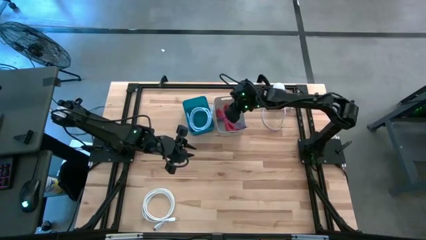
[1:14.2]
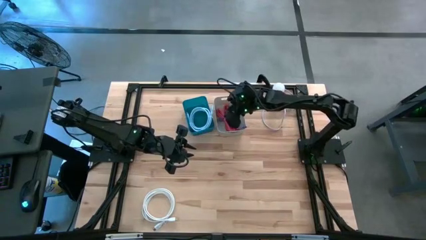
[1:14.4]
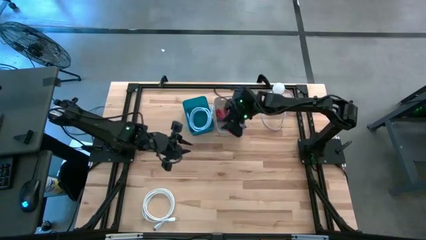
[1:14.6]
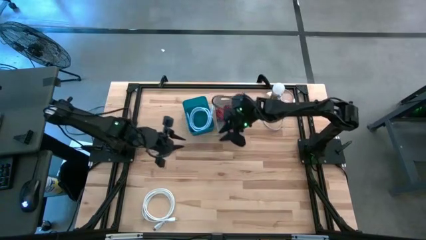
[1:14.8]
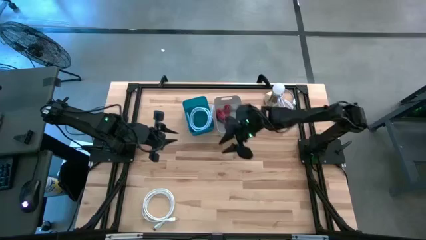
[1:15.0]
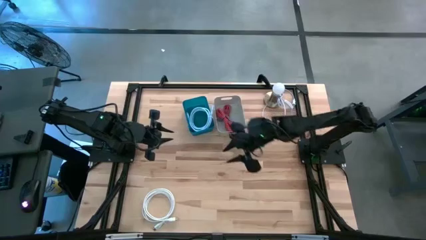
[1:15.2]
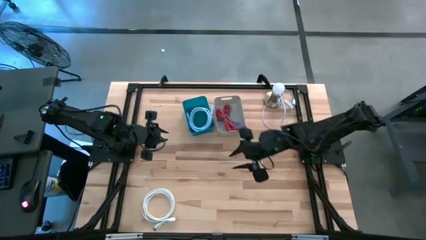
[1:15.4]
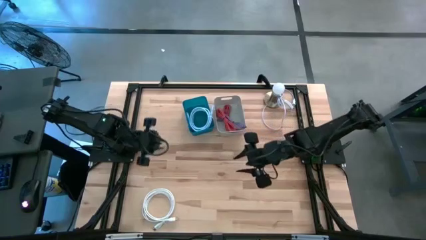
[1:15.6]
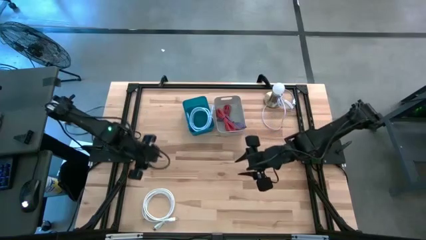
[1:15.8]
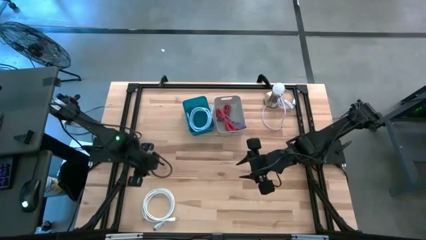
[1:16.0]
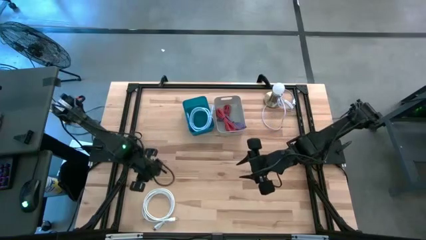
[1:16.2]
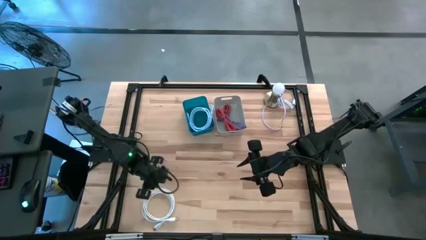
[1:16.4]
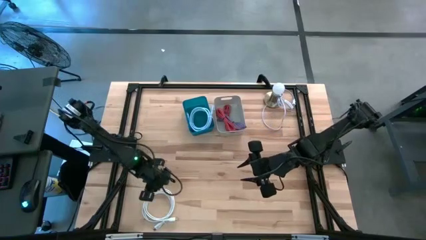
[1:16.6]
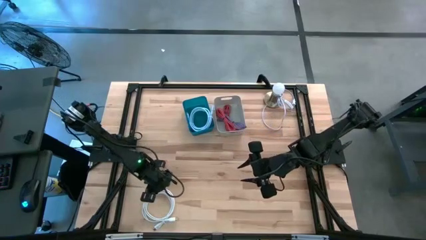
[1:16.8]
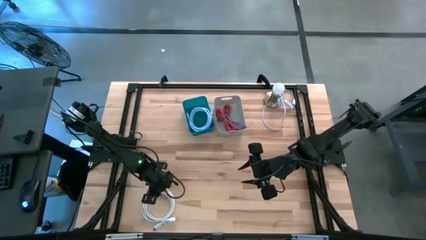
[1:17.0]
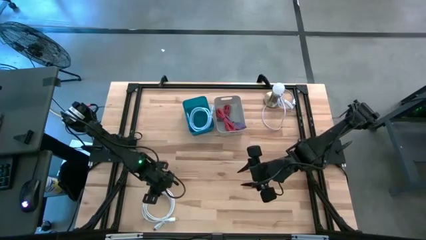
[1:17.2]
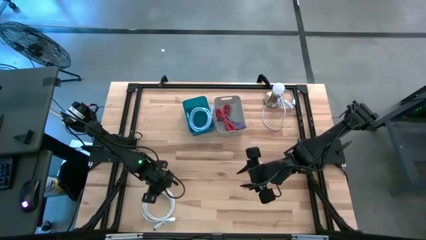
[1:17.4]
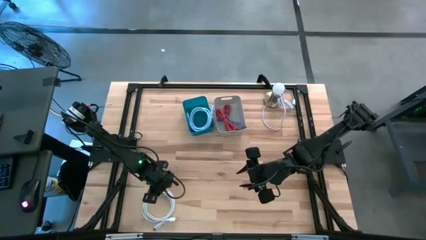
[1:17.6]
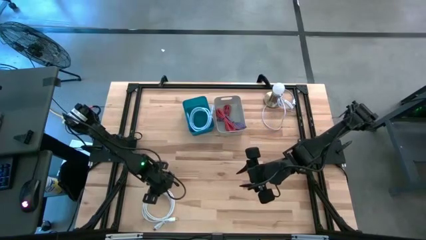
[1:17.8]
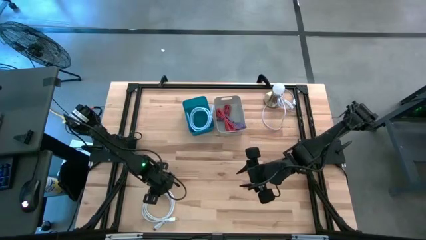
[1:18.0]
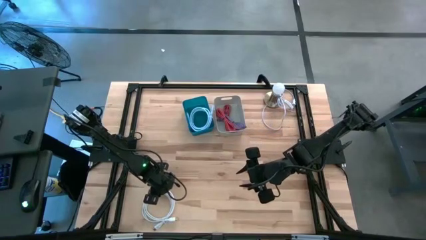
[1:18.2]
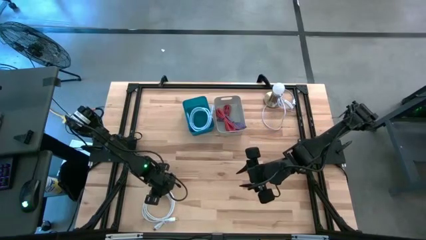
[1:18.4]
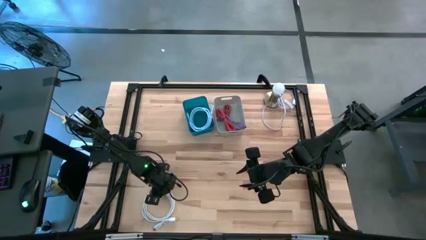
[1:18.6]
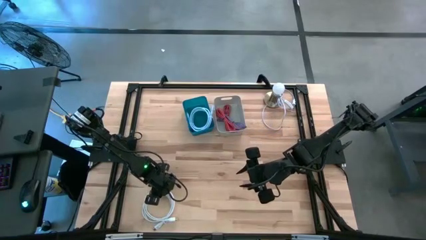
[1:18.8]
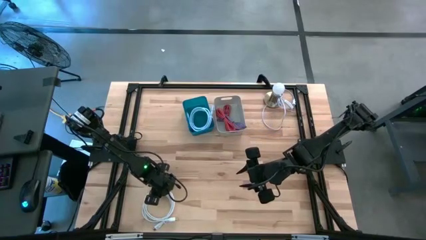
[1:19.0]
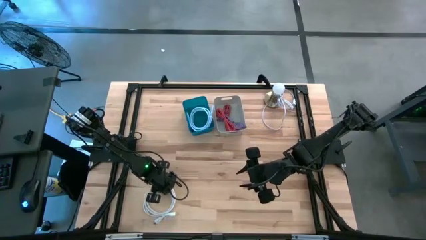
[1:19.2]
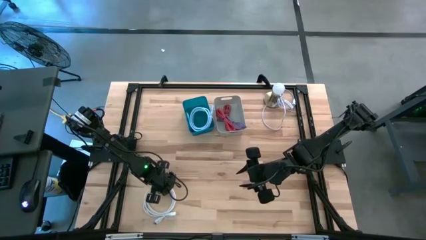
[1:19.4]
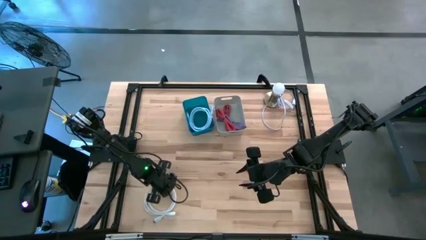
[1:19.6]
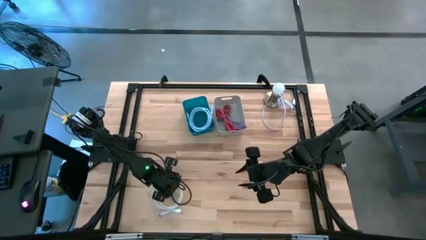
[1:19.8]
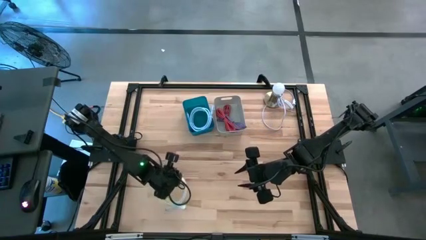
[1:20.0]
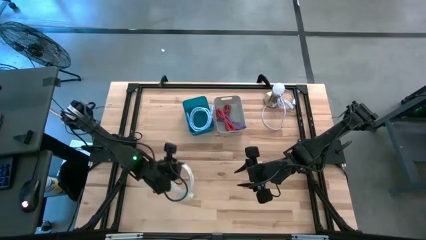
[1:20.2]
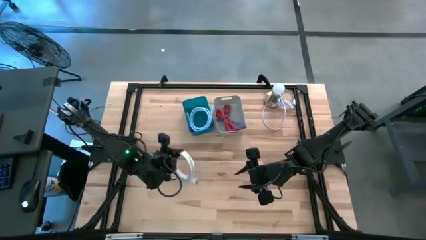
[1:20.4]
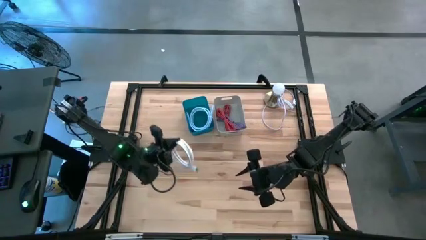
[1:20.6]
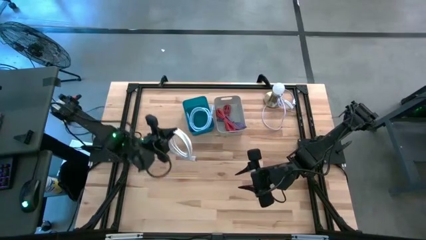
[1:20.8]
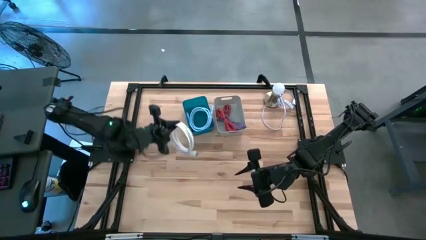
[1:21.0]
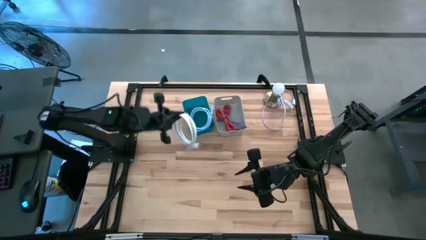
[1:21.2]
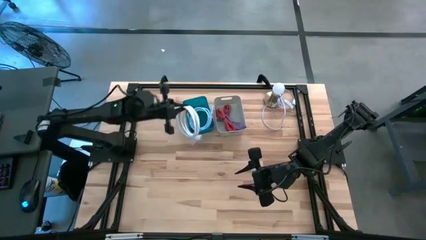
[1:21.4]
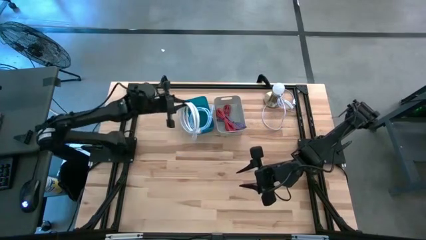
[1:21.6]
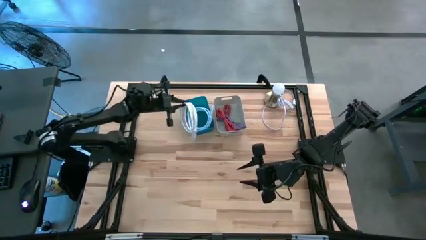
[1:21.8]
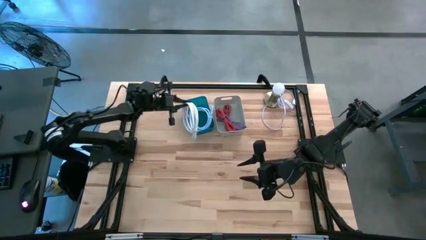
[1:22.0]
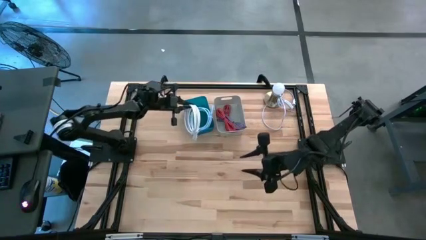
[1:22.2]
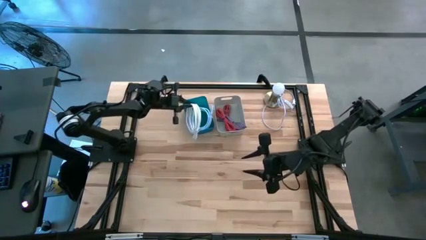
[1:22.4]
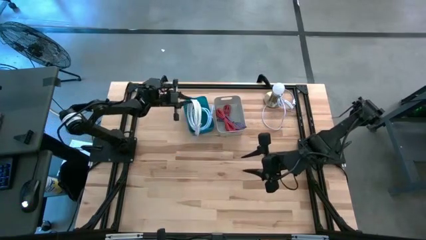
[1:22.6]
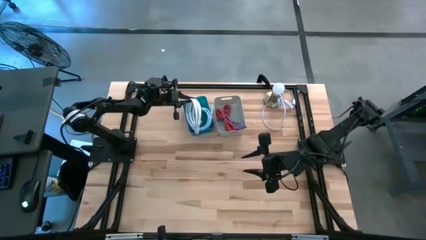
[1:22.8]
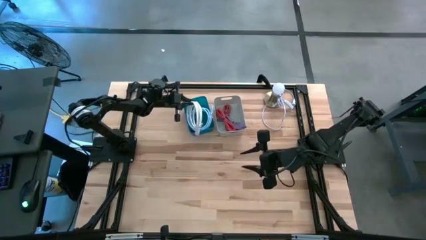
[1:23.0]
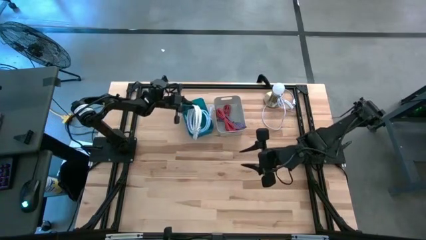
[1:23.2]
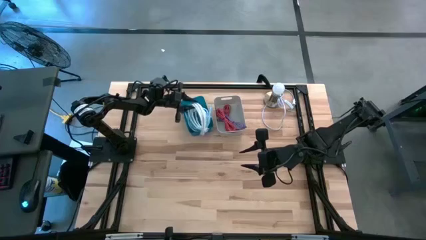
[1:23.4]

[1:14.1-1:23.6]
Task: Pick & Place USB Port
Put the white HDMI cable into the blue bin

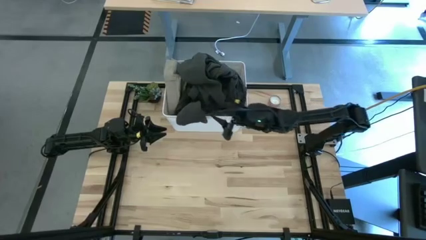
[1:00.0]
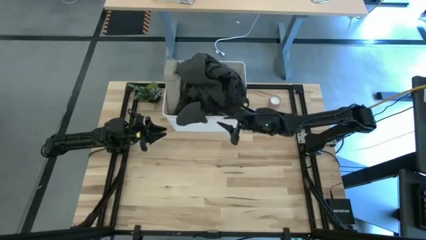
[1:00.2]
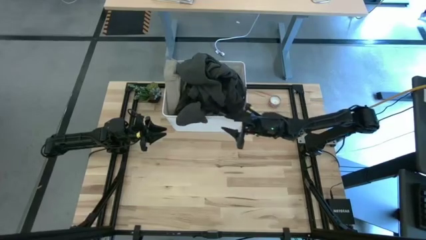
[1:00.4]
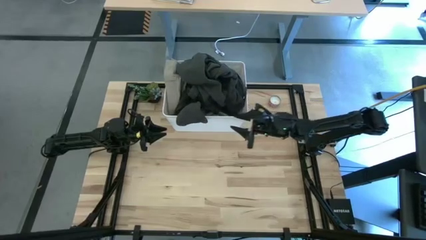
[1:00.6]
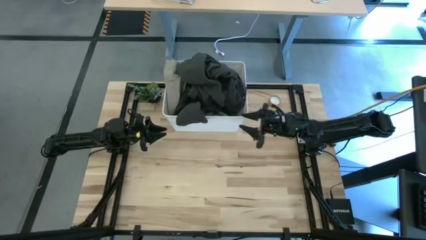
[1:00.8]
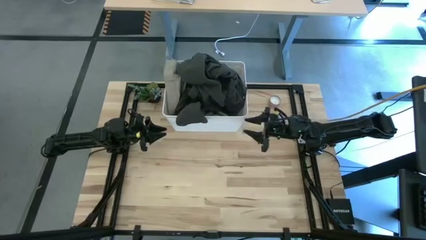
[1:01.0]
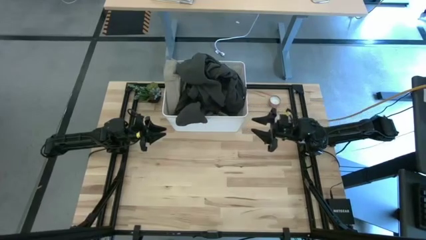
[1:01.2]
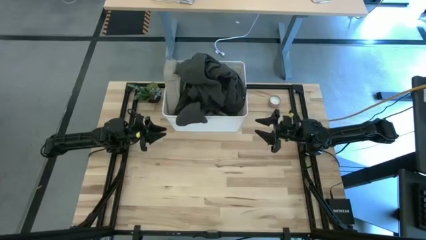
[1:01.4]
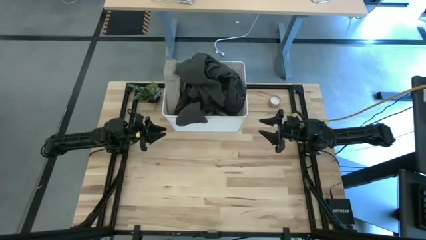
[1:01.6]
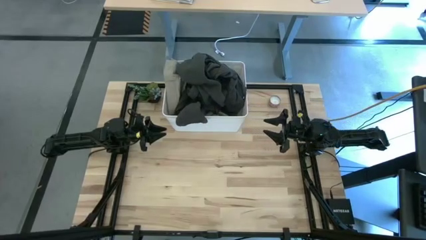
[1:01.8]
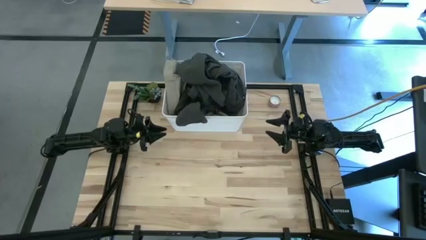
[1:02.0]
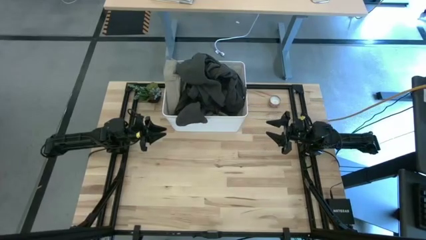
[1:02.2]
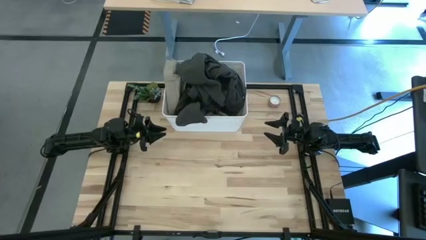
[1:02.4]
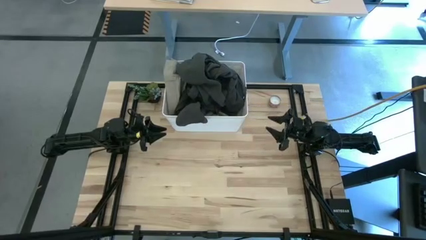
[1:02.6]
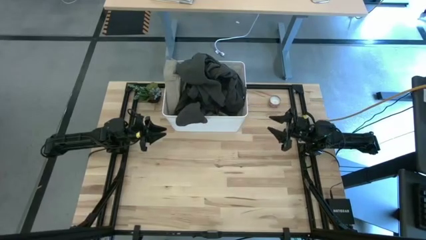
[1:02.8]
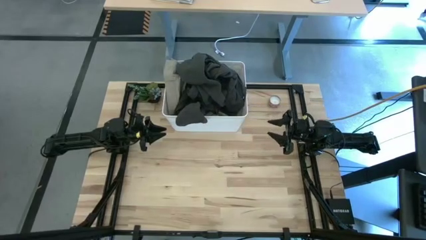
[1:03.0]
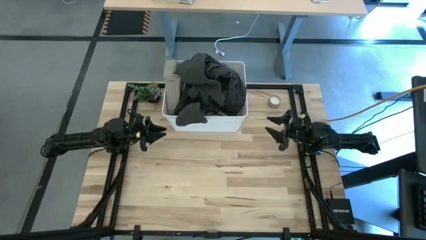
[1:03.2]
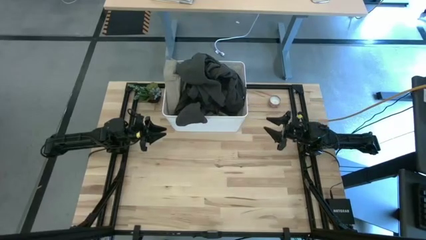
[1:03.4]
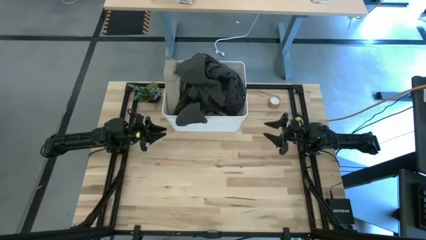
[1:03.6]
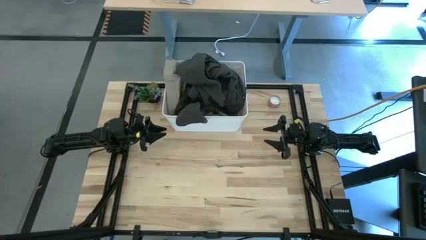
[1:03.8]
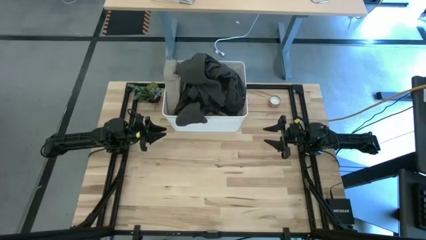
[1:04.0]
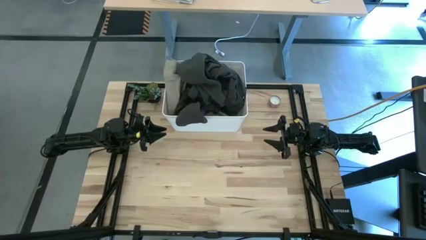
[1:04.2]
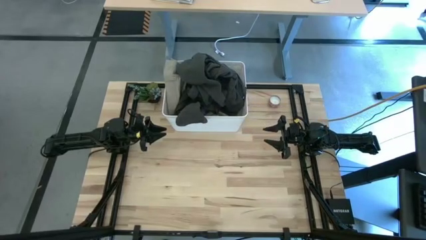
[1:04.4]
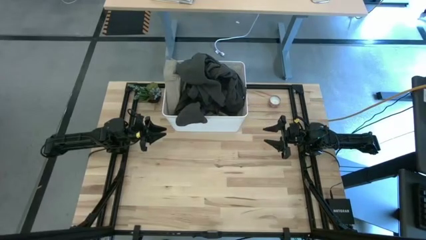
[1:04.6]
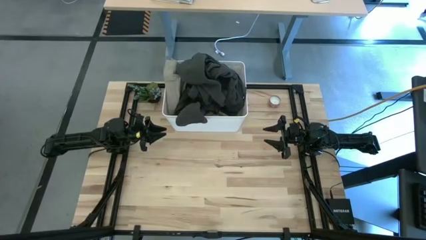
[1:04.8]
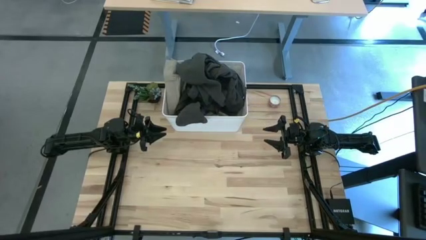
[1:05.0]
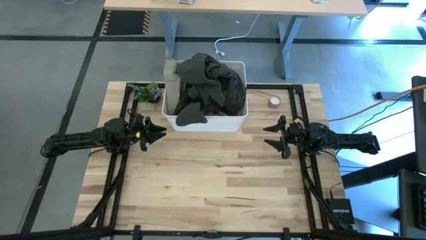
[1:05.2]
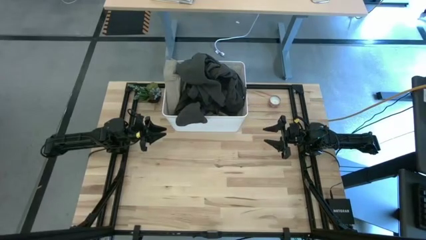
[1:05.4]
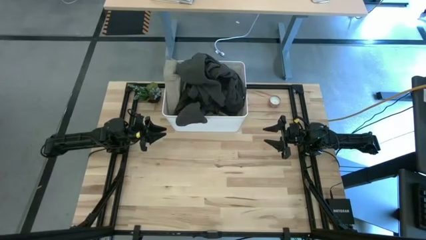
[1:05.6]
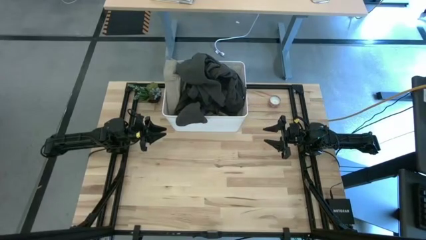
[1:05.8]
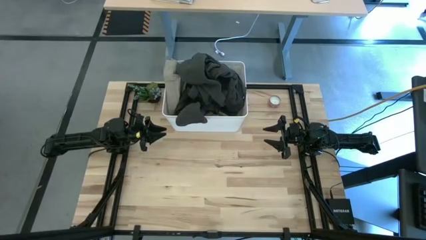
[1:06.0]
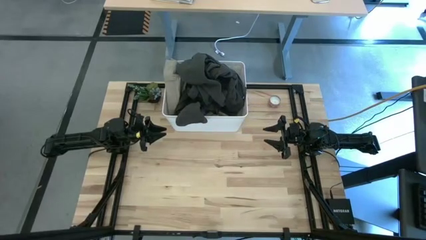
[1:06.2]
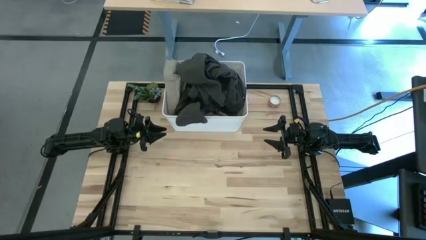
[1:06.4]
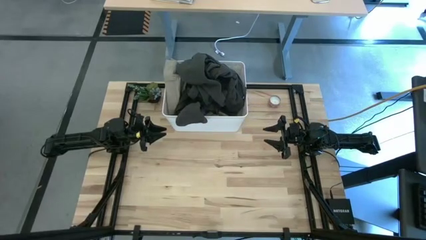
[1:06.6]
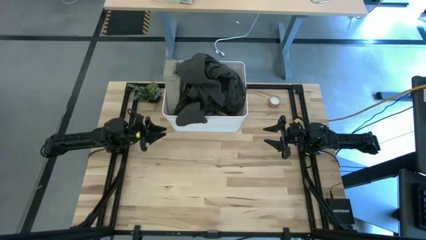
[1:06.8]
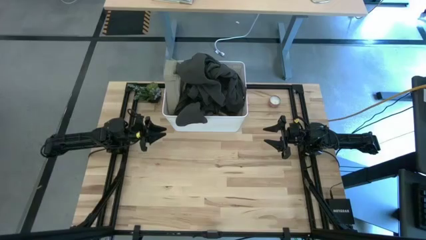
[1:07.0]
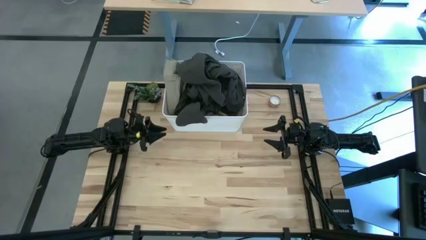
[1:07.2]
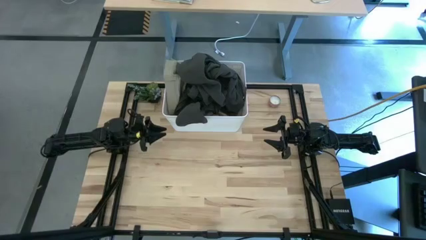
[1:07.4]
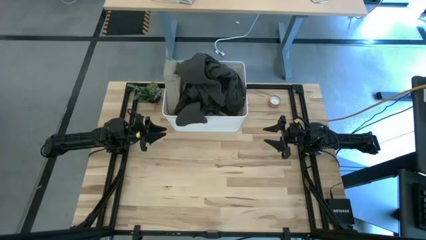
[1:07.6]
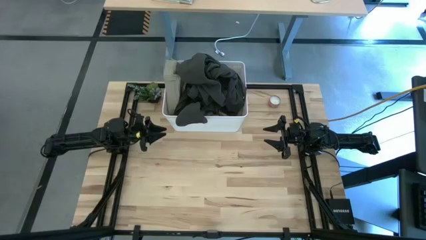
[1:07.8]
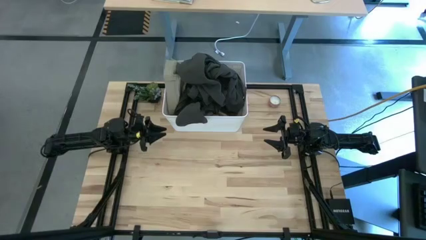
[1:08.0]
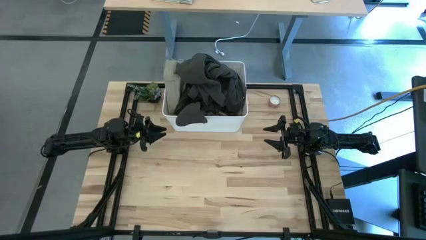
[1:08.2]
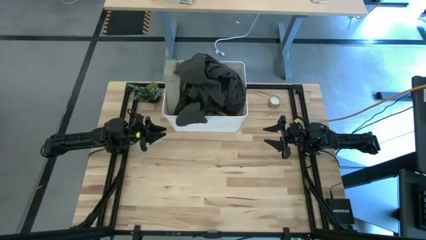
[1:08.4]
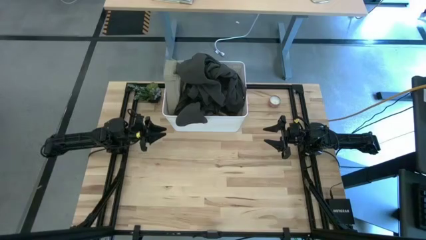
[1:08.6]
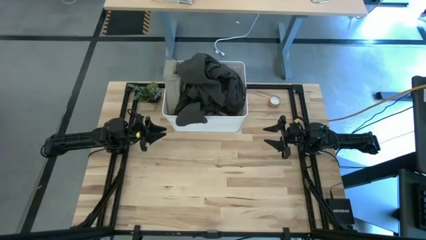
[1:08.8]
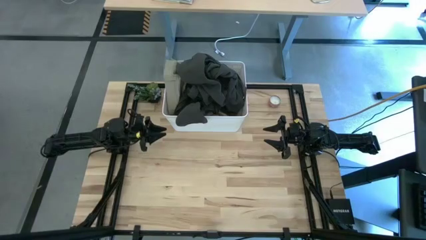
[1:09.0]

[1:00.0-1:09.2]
Task: Sort clothes
Return to Home Position
